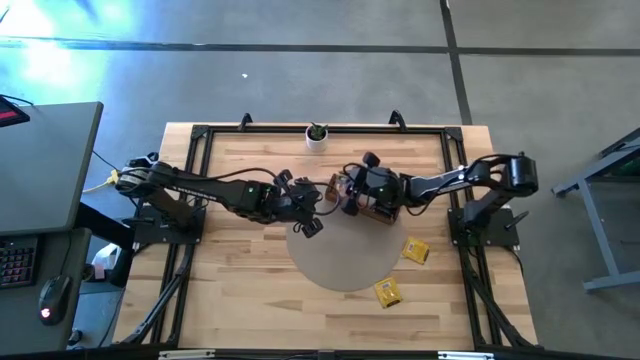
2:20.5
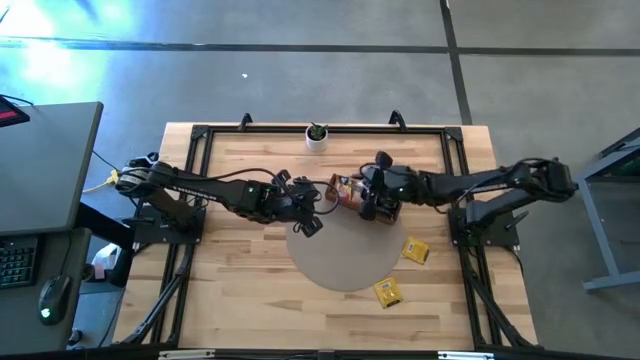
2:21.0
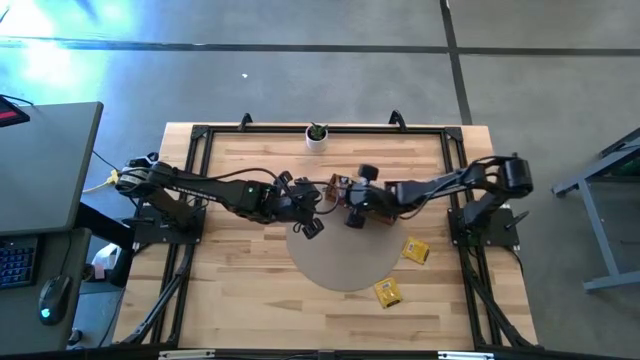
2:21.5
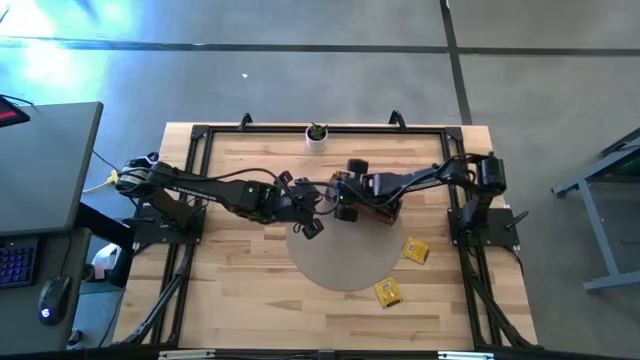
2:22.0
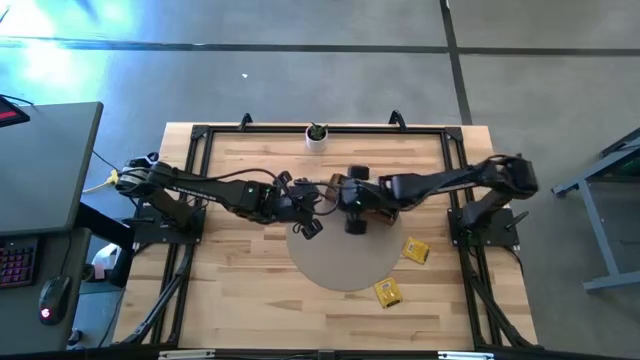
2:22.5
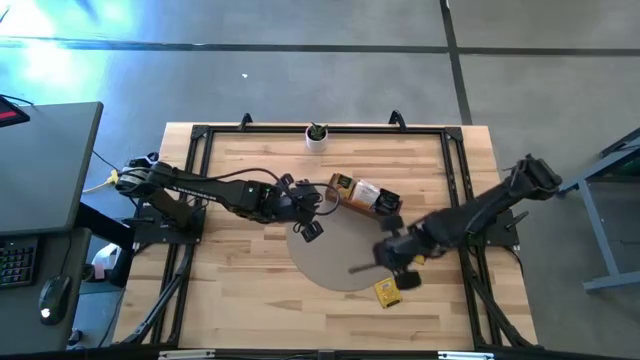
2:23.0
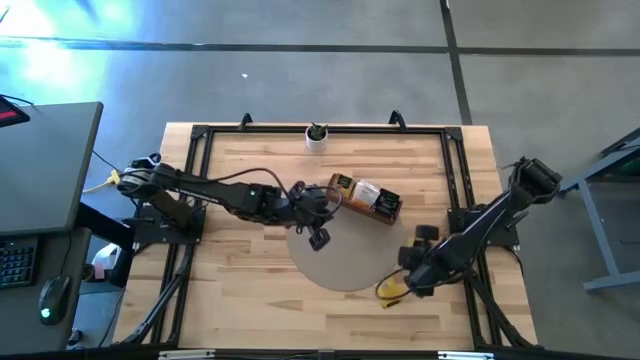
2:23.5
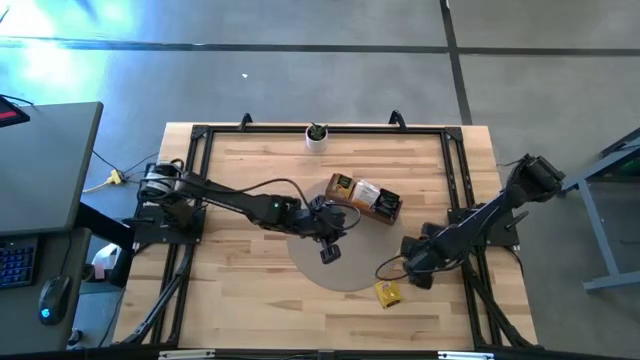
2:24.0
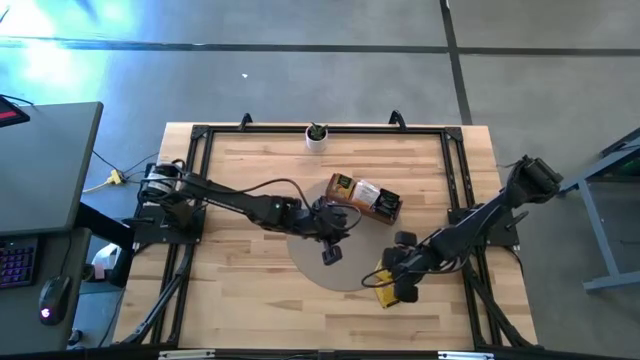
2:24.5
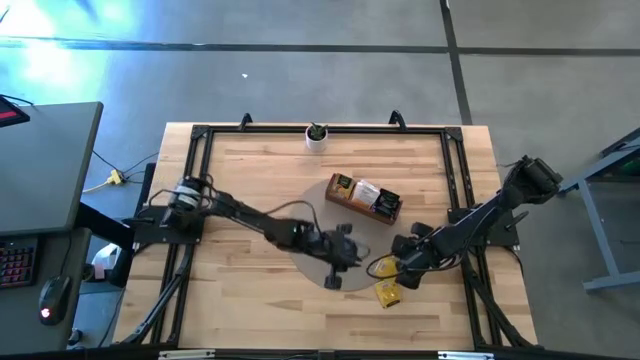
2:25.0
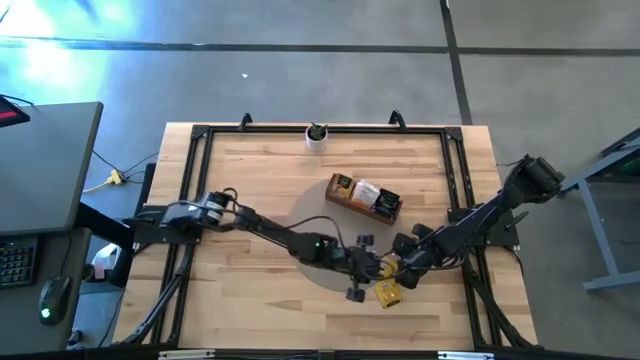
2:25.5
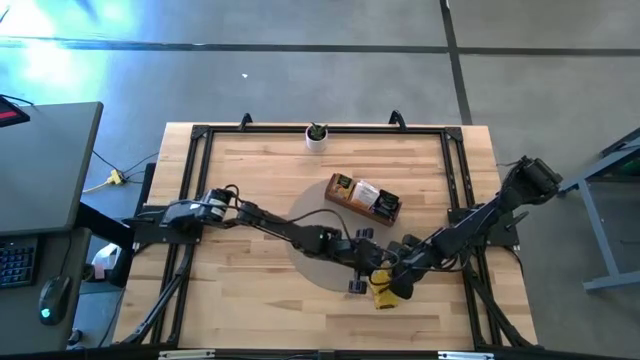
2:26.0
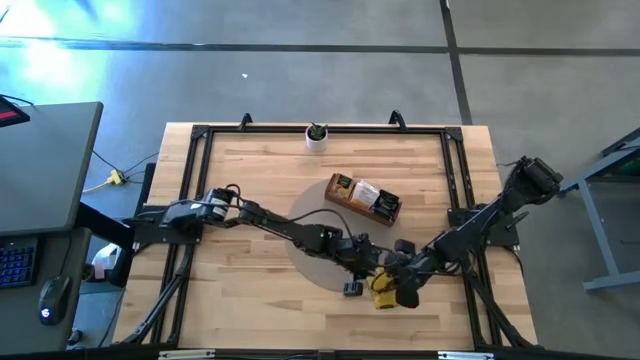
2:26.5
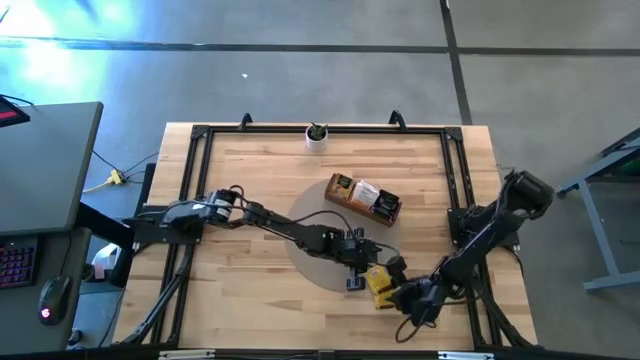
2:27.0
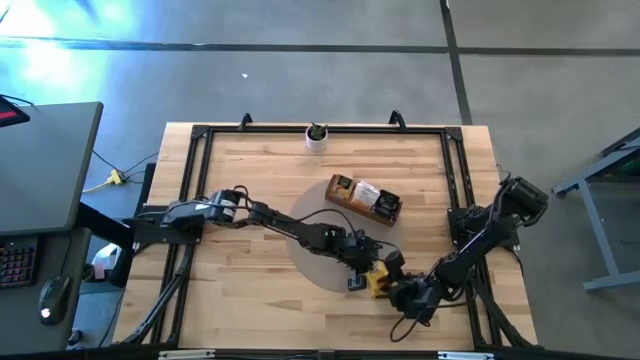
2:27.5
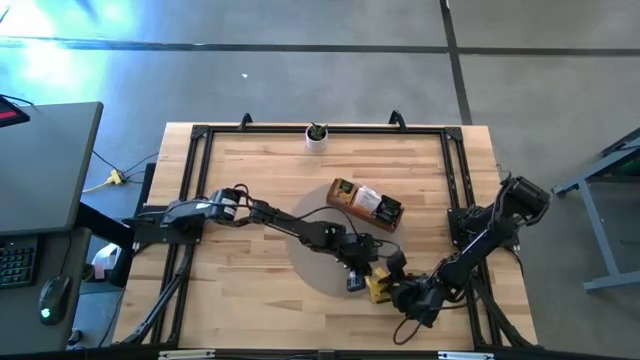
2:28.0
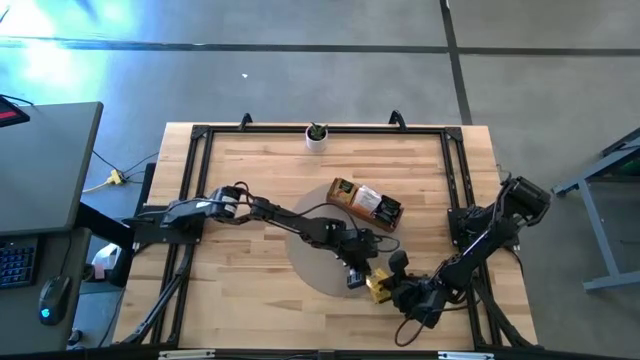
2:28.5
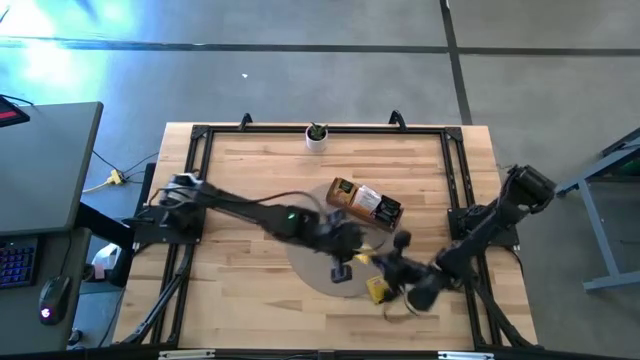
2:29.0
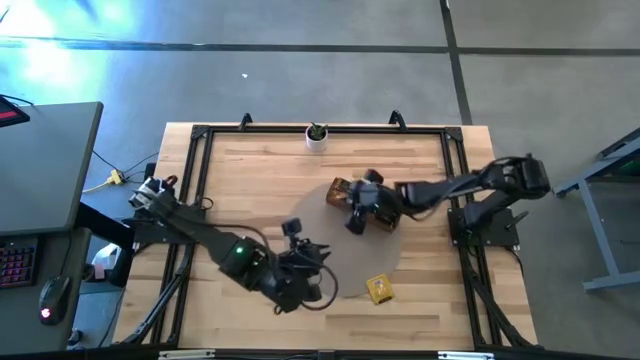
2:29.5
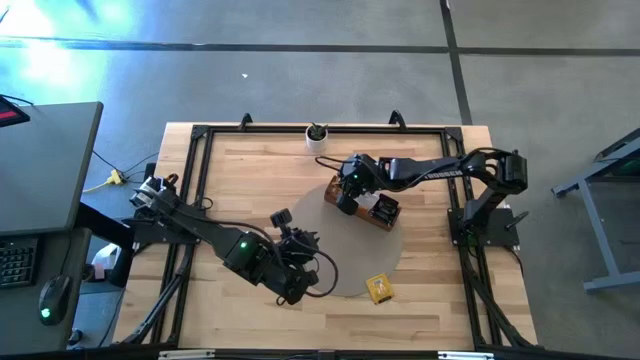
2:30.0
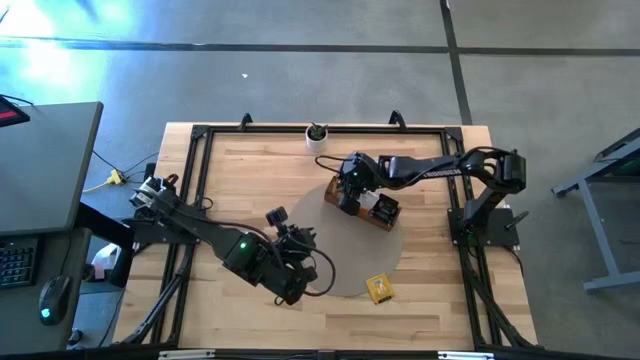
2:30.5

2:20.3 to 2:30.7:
Task: Pick & Place Tea
Put the top yellow tea bag into the left section of the wooden organizer

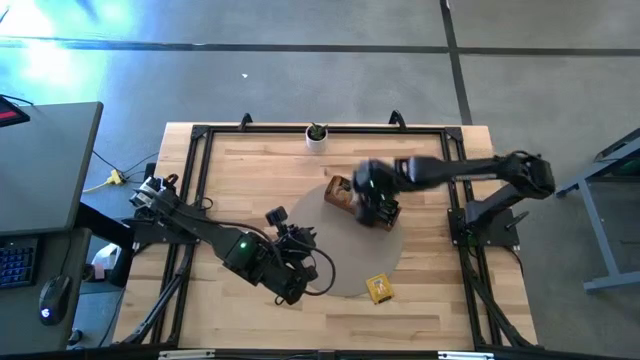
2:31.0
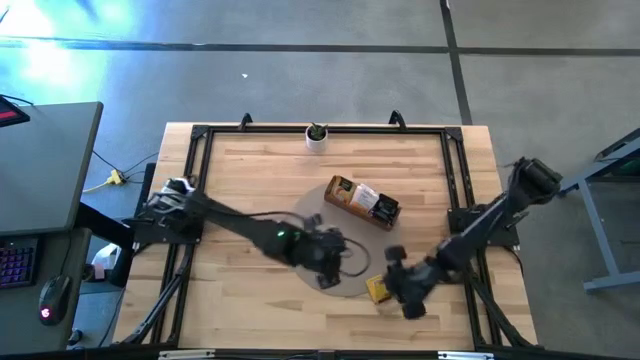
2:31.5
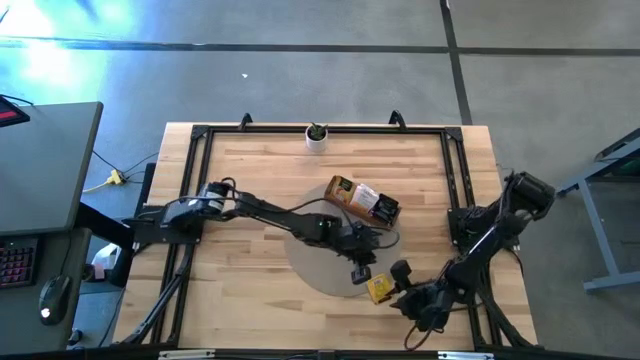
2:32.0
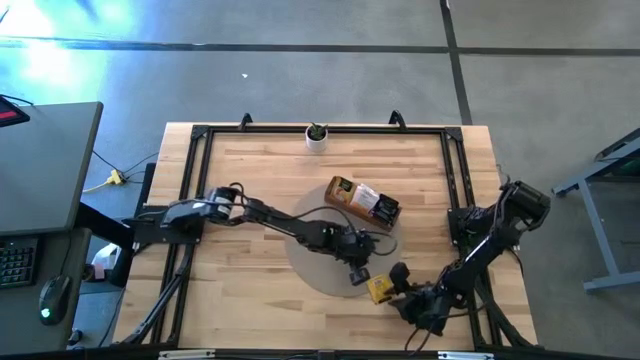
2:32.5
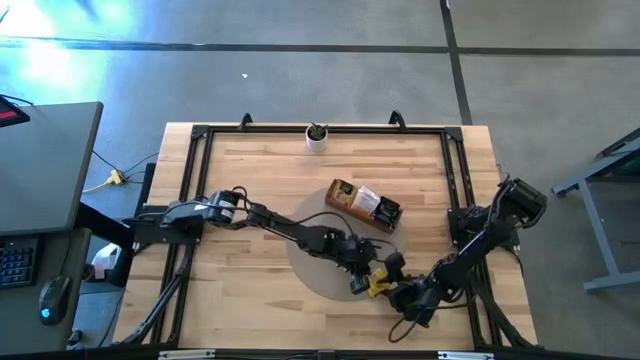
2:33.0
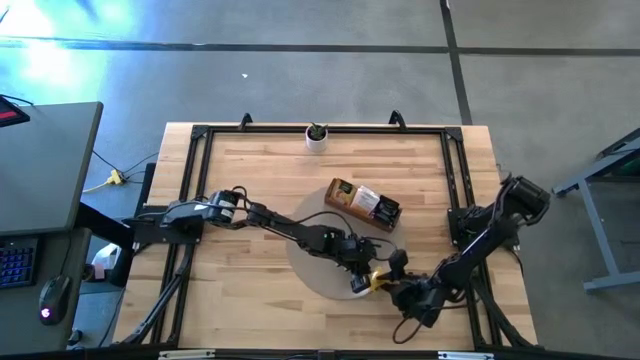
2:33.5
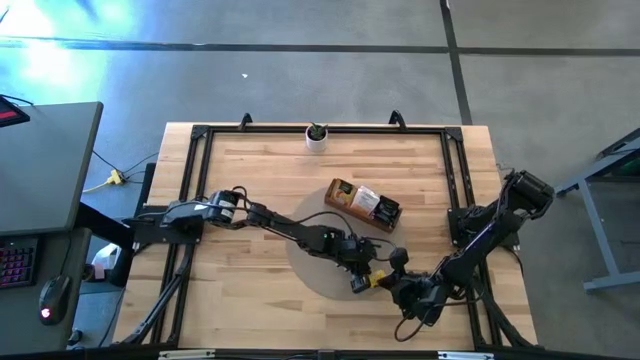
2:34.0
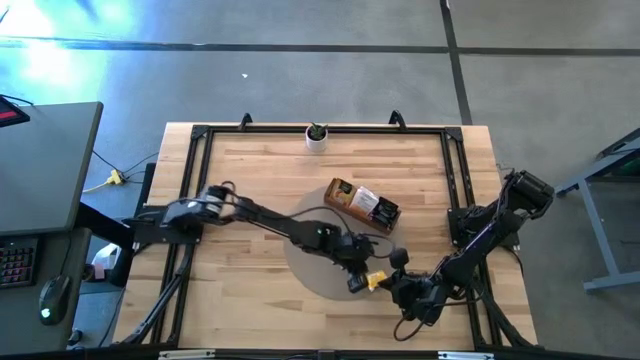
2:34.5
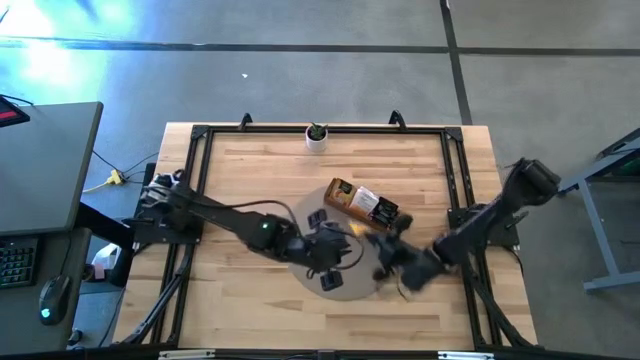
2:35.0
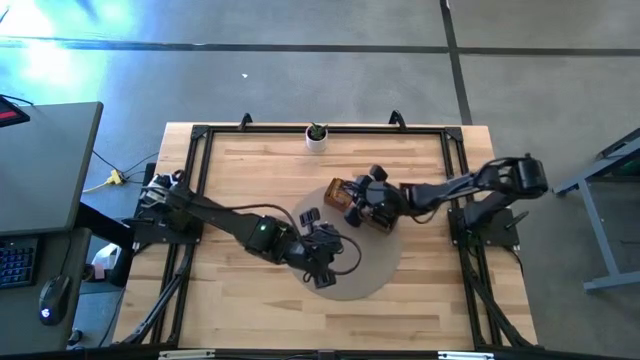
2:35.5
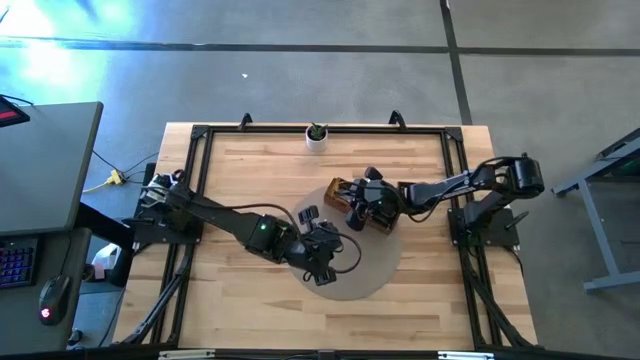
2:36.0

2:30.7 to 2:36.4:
Put the yellow tea bag into the left section of the wooden organizer

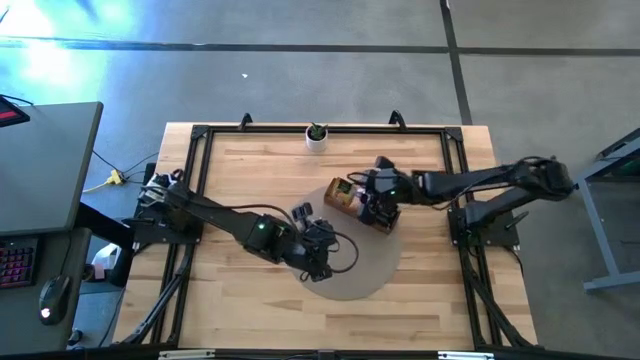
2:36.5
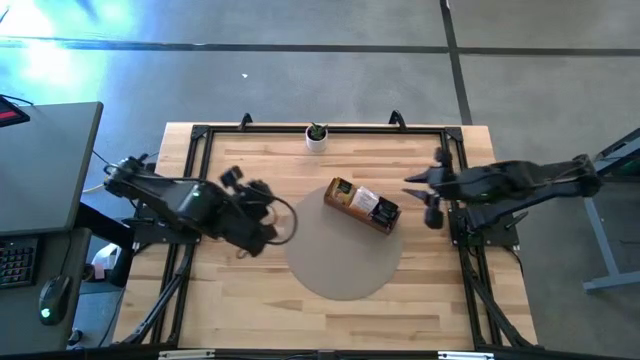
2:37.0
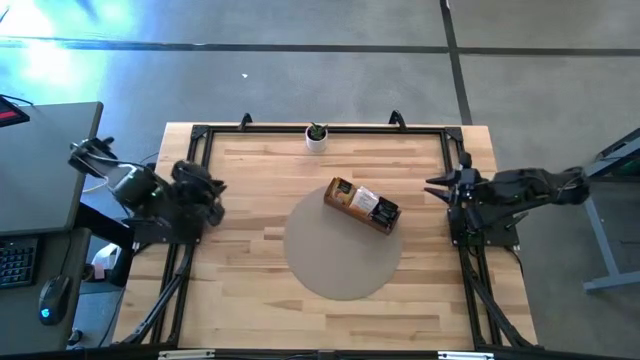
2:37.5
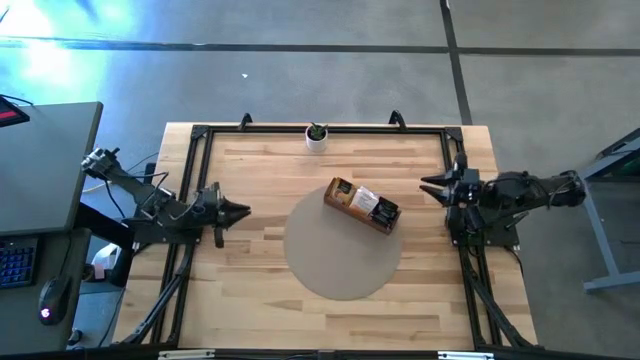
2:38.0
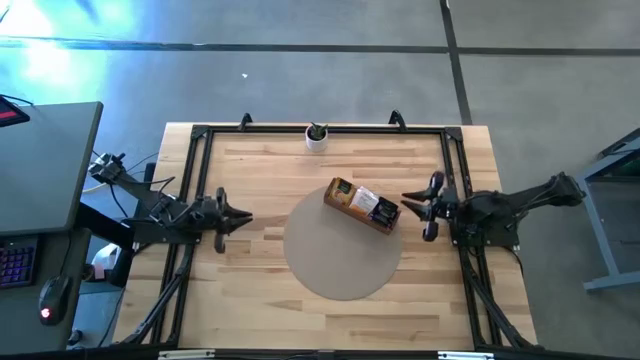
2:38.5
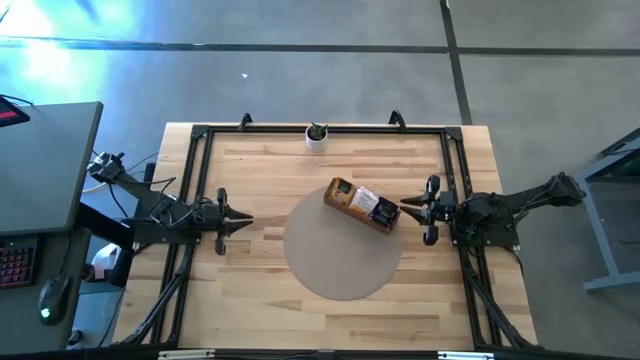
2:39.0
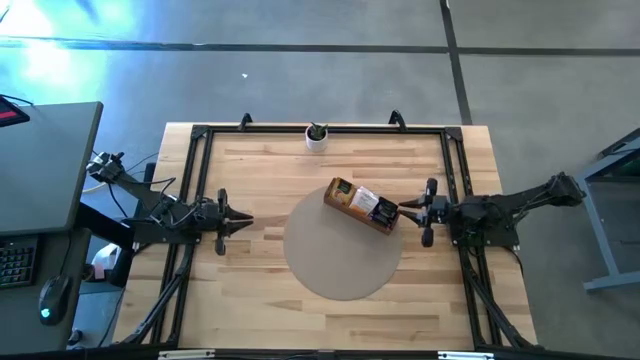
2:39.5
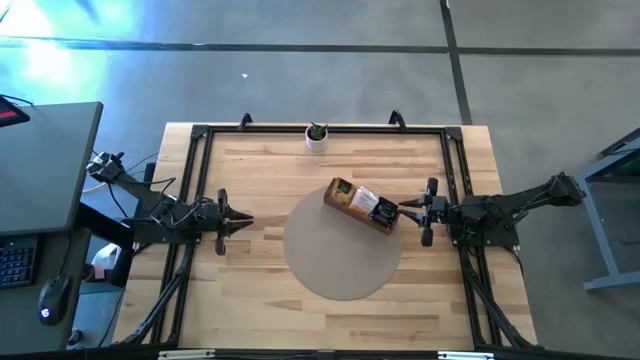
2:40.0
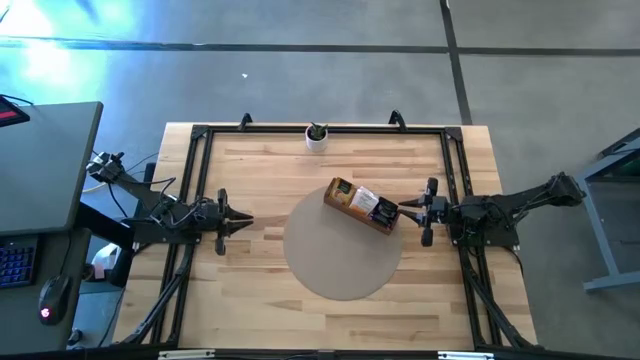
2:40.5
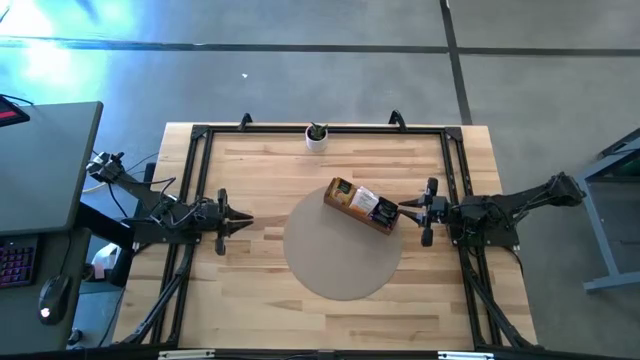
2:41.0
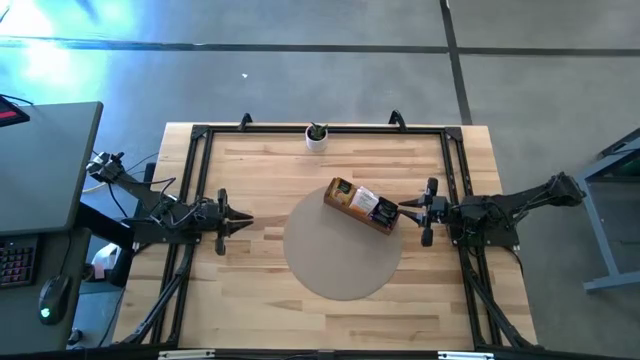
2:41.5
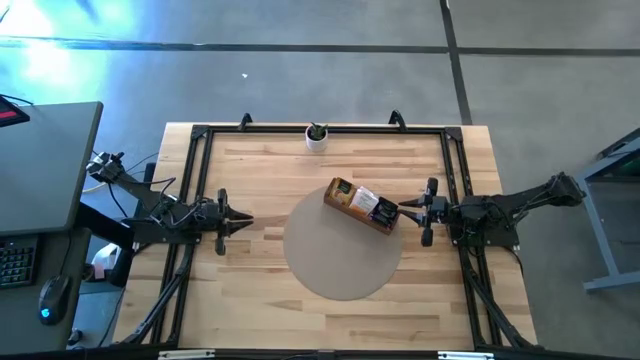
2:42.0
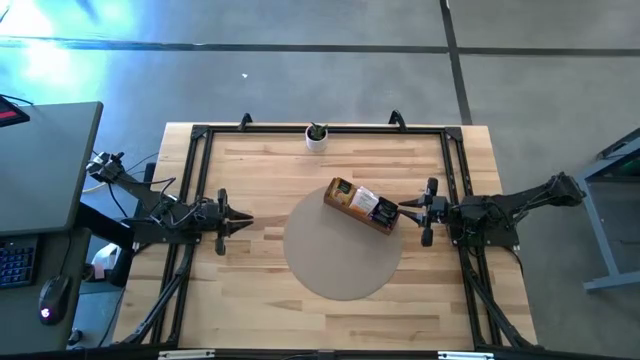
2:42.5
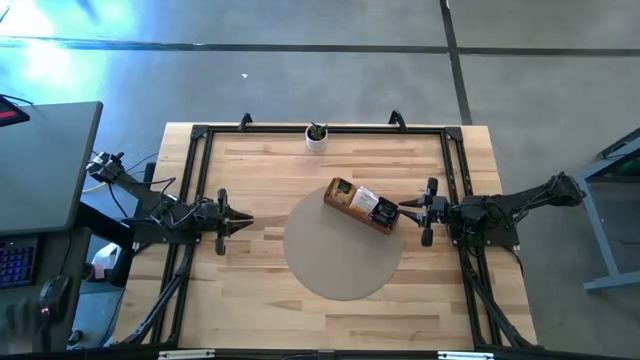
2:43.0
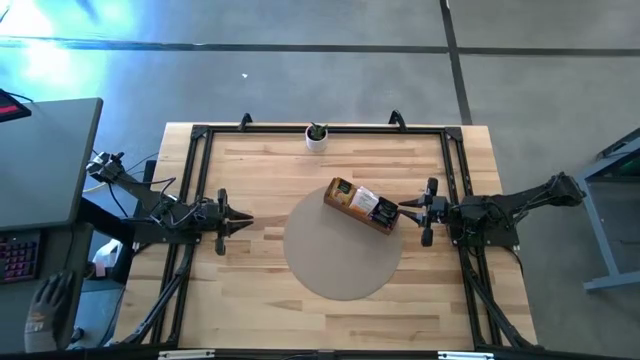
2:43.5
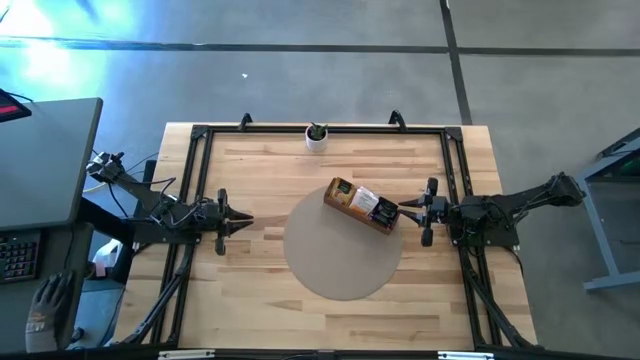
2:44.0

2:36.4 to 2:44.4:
Return to Home Position
